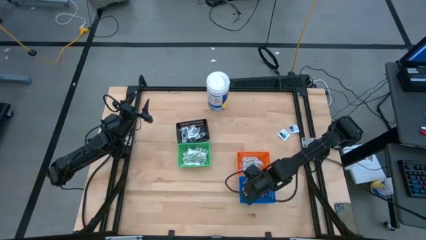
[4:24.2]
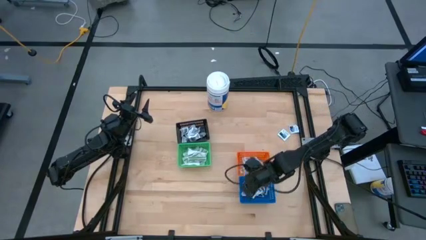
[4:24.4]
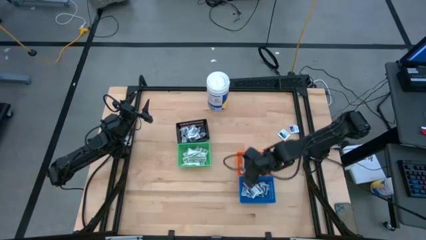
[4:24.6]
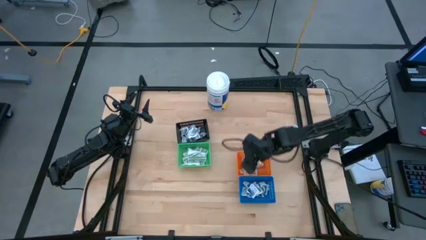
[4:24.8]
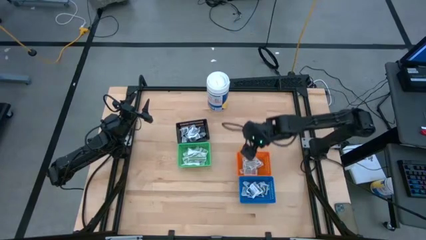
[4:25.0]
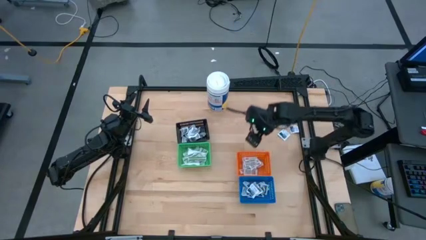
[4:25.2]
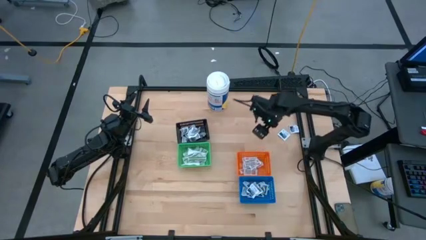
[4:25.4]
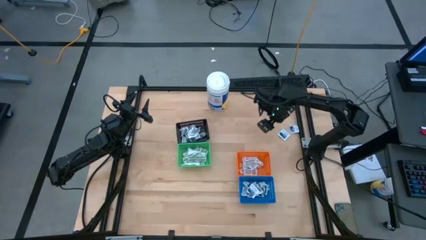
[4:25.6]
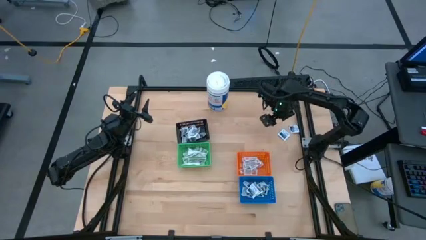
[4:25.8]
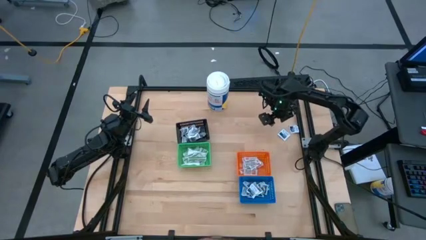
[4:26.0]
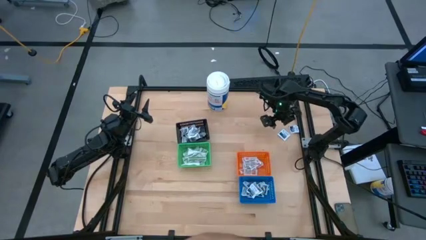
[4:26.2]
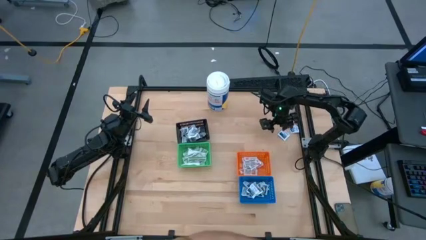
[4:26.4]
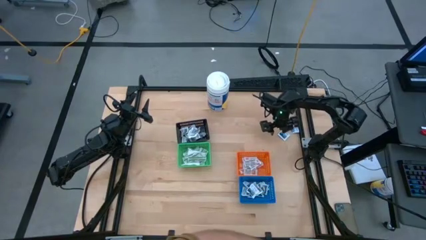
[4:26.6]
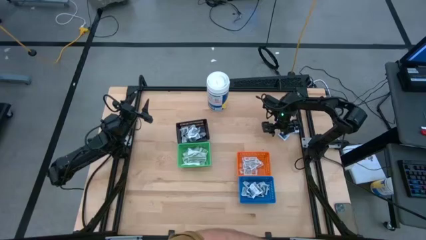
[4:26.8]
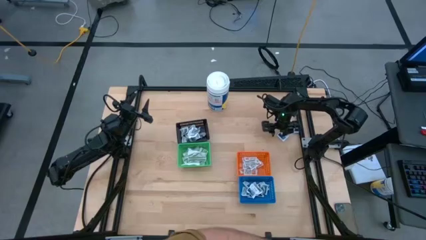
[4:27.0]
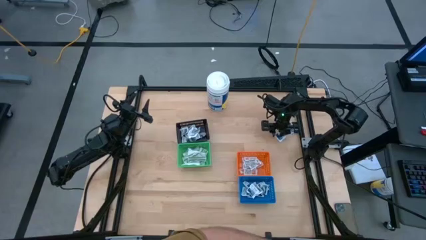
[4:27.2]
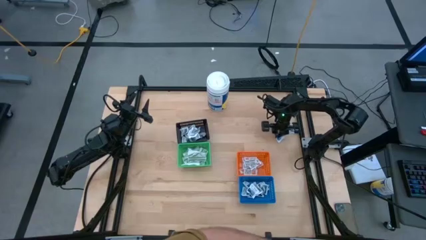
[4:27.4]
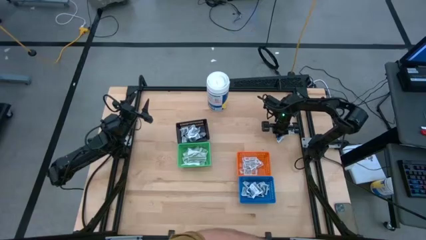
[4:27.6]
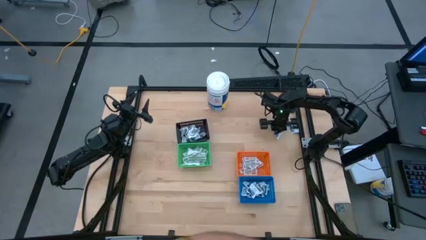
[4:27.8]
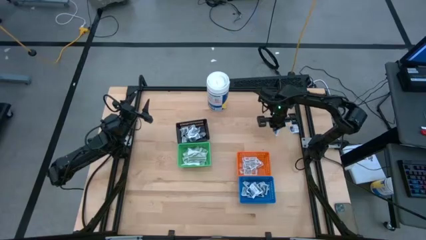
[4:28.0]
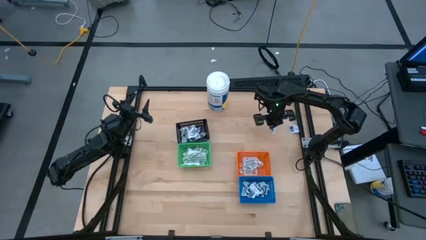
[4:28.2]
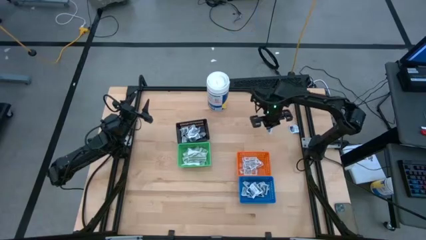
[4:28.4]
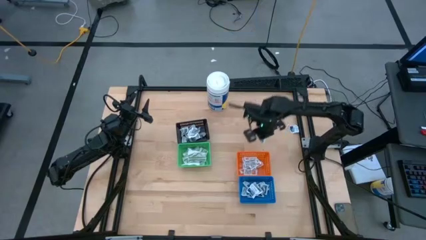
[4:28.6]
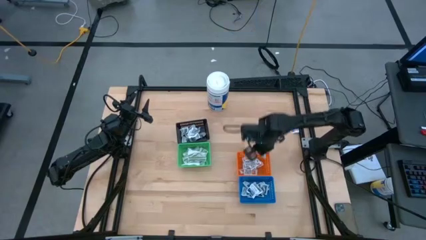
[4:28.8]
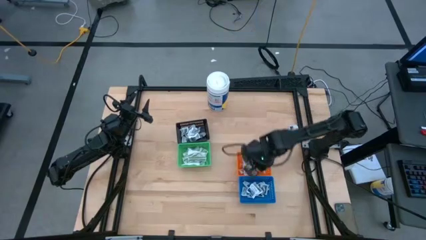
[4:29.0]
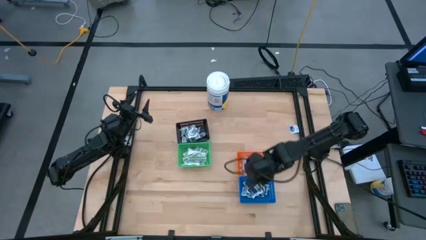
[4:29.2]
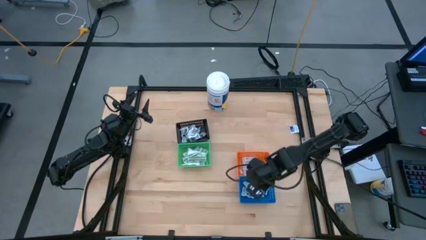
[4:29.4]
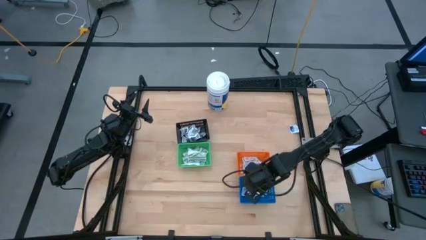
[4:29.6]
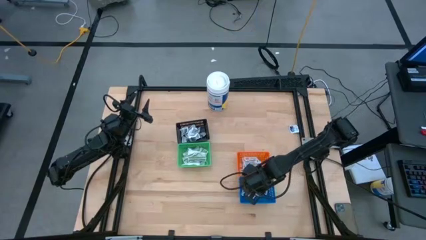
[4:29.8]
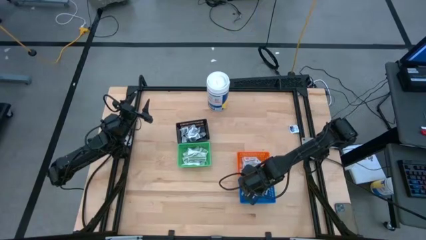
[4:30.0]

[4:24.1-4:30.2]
Task: Pick & Place First Aid Supplies
Put the blue pad into the blue bin

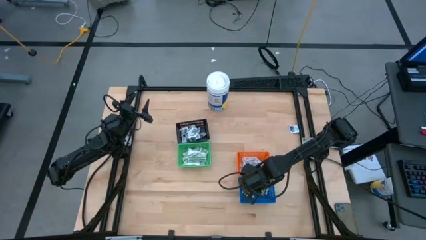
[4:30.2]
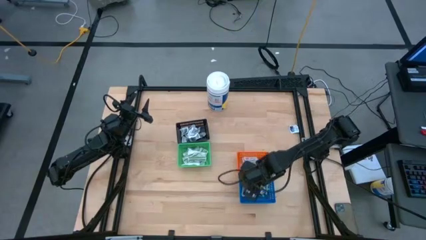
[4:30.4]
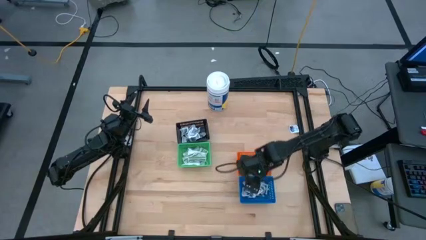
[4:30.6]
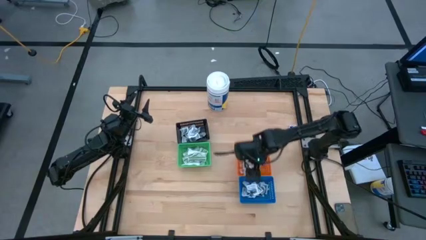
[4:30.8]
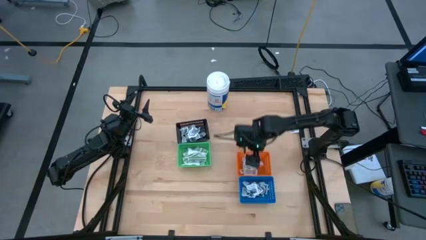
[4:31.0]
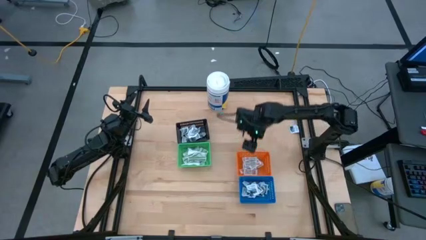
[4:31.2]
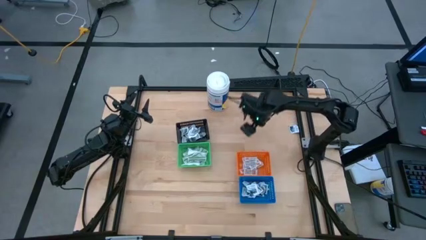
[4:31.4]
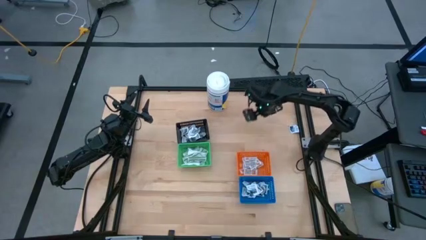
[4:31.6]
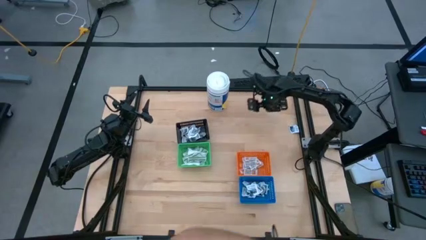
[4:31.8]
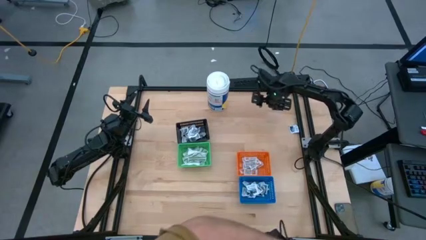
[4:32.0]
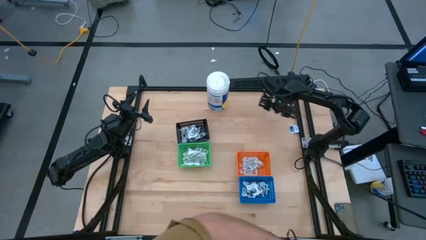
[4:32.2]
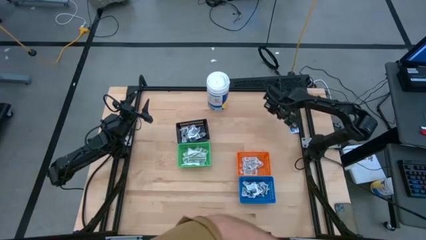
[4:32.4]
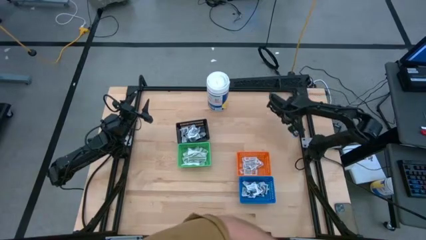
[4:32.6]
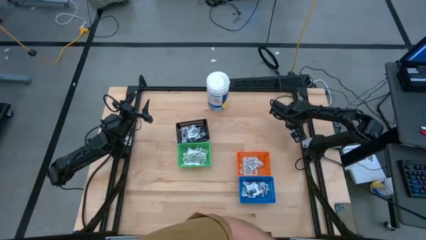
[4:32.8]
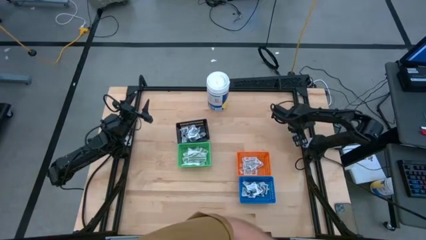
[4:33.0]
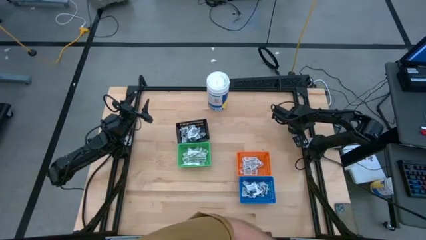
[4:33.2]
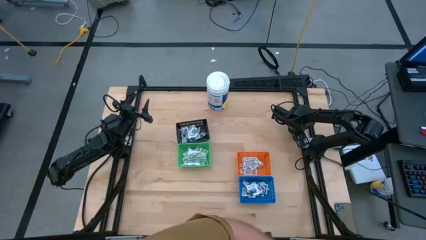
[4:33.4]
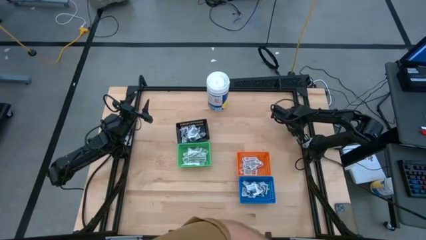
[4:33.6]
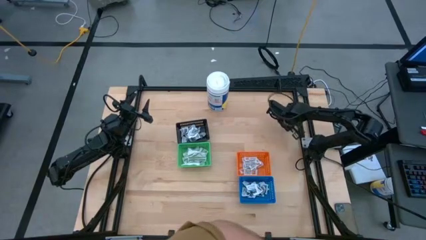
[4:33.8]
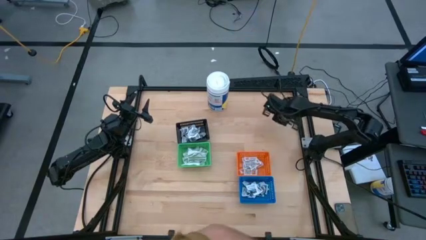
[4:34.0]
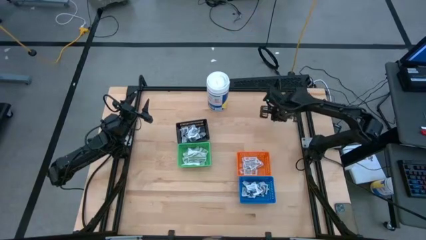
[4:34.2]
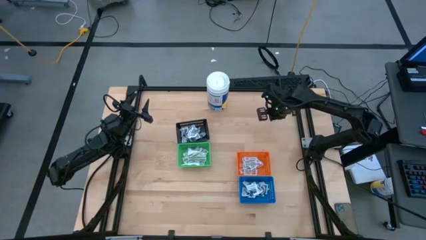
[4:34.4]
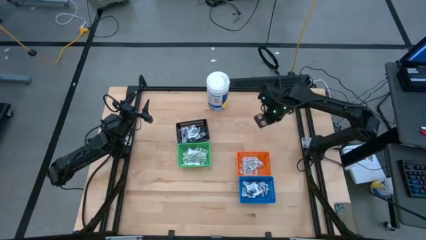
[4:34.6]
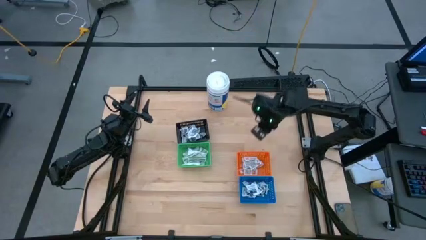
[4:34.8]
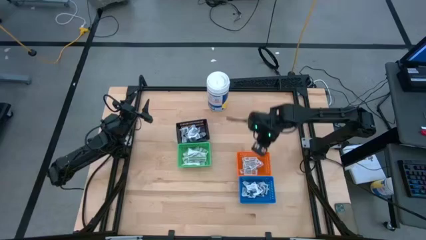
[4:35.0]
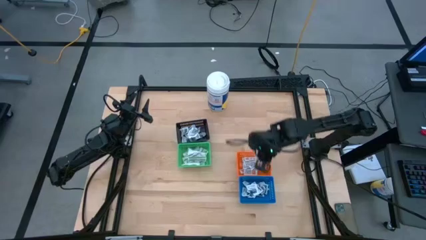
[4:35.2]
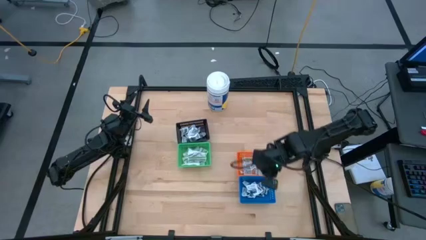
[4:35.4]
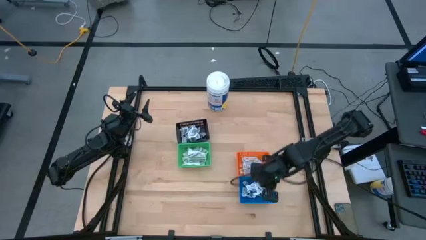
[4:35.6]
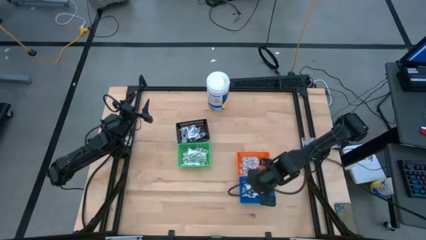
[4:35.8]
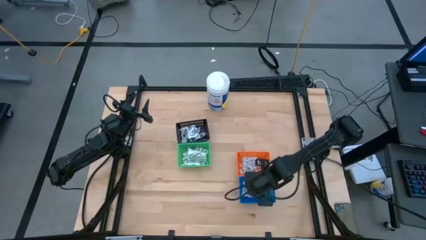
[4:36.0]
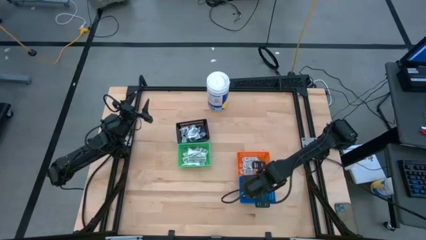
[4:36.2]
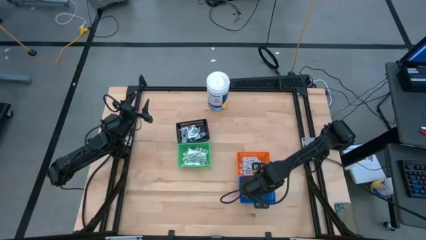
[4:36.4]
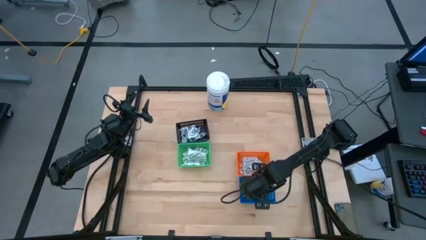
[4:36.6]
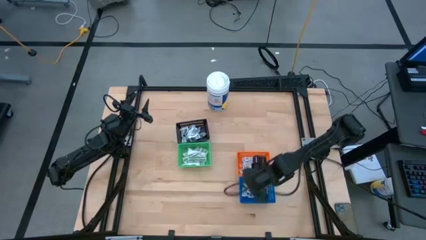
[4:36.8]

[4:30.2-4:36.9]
Put the blue pad into the blue bin

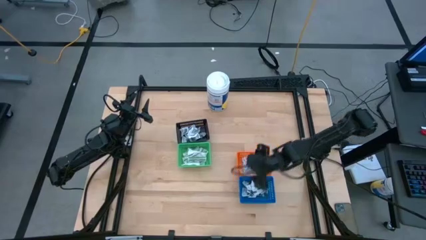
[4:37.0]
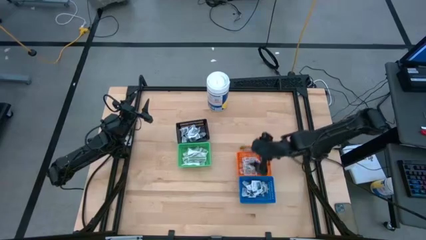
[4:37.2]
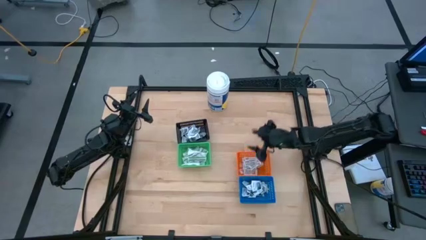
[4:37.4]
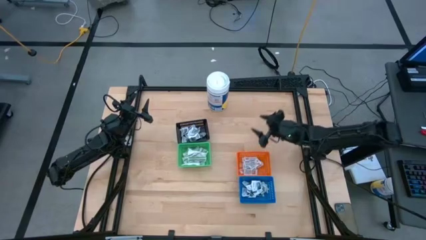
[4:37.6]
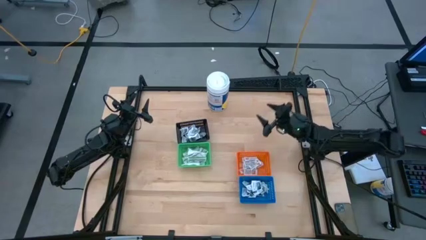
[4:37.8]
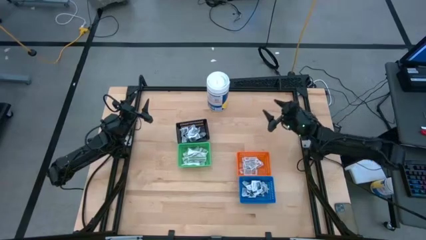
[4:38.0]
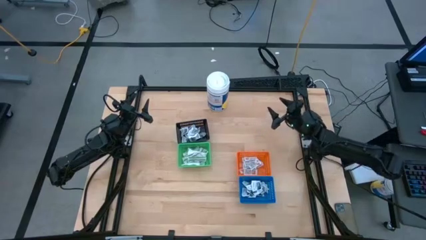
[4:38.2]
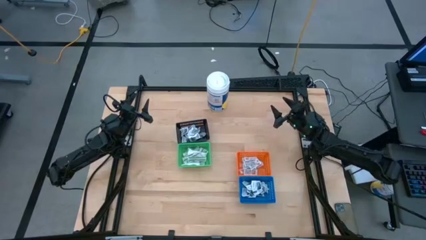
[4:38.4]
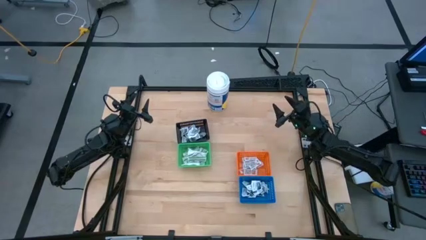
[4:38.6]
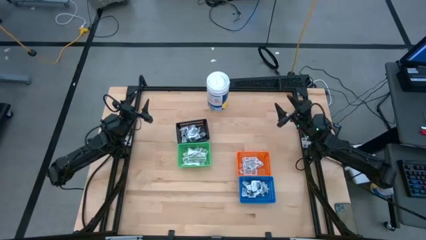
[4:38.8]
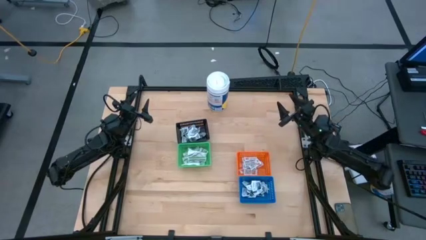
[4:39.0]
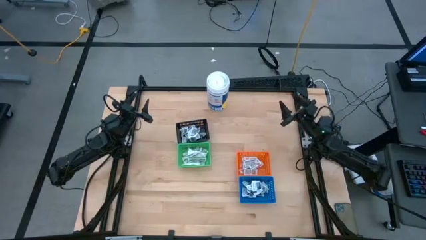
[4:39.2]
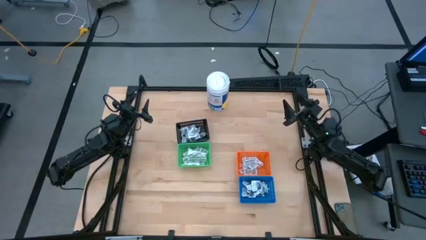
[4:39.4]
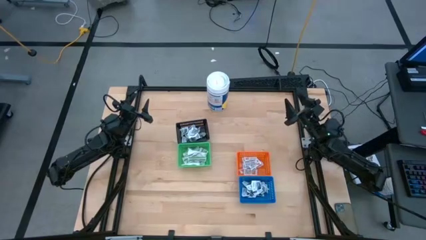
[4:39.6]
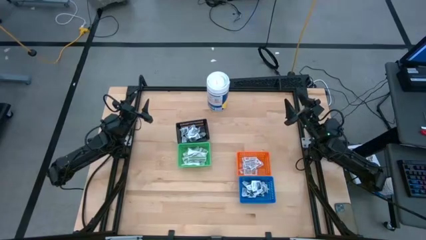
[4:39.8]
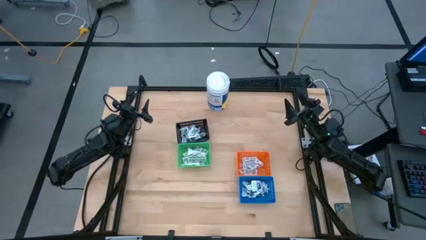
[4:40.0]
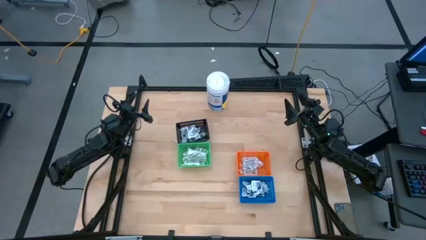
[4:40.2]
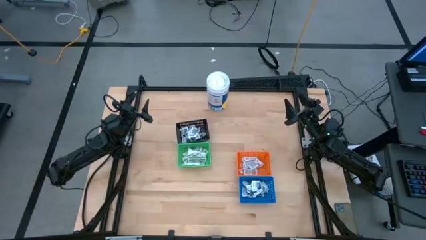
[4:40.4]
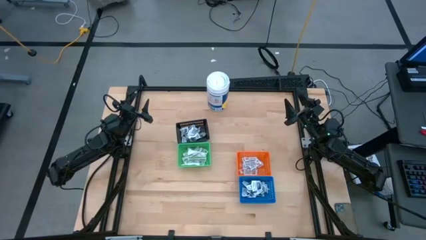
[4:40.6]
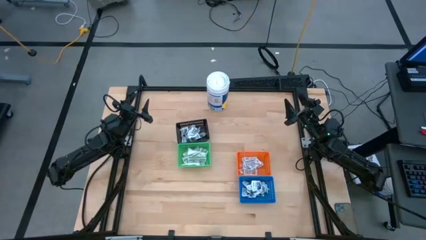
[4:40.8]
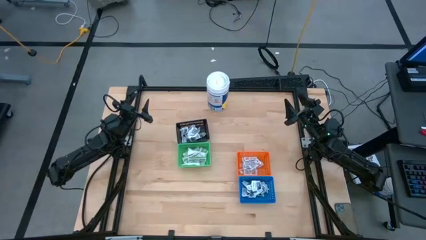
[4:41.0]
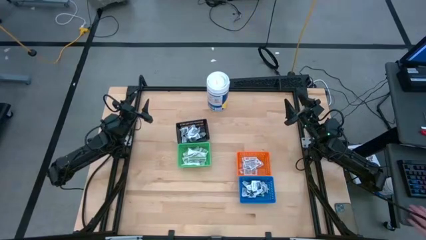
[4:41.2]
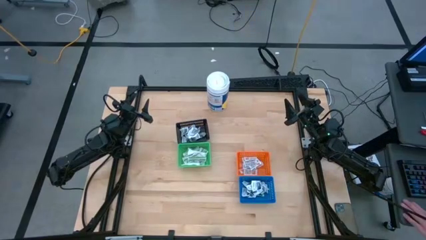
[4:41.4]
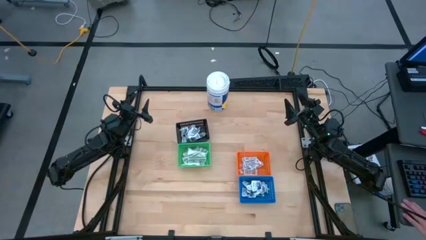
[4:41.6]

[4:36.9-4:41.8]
Return to Home Position
